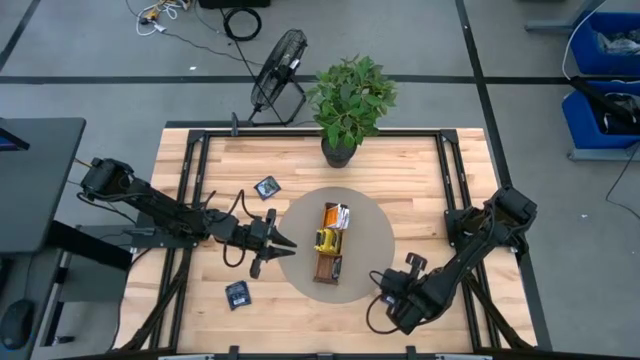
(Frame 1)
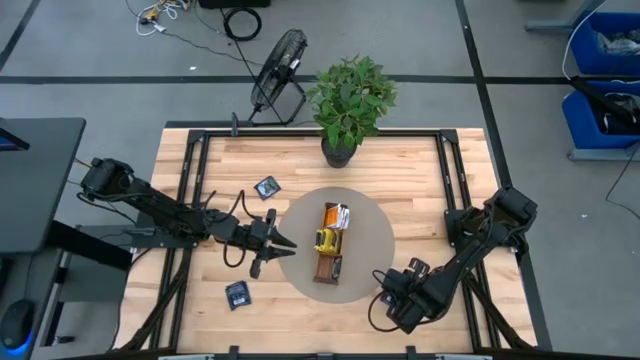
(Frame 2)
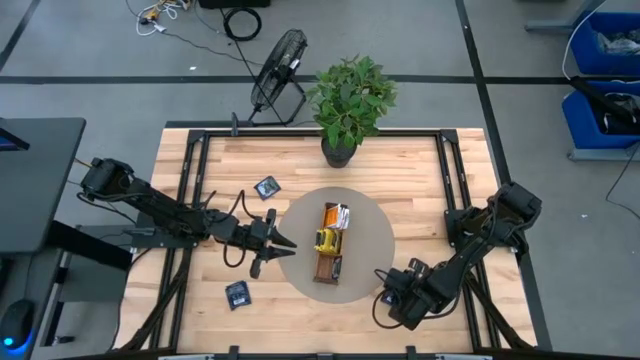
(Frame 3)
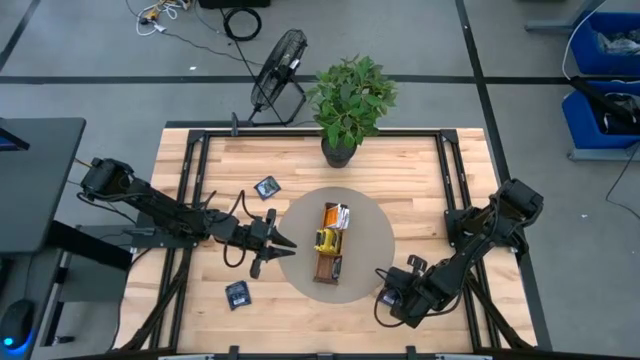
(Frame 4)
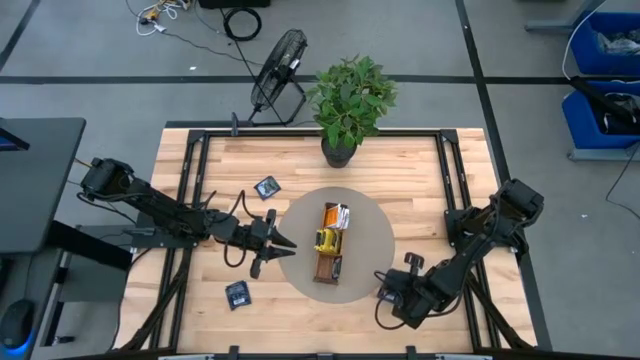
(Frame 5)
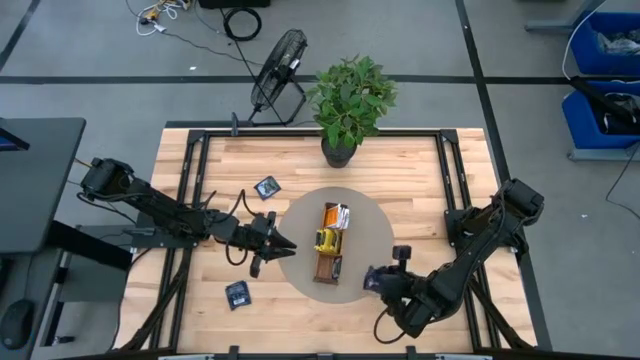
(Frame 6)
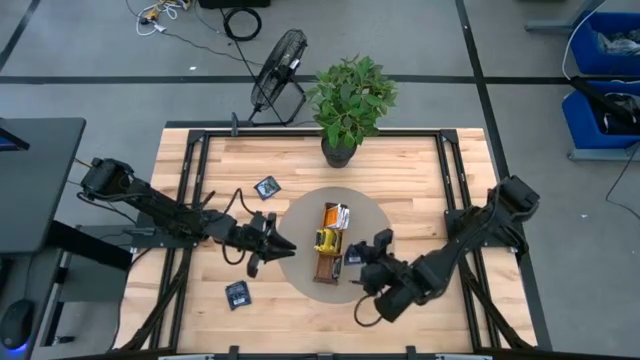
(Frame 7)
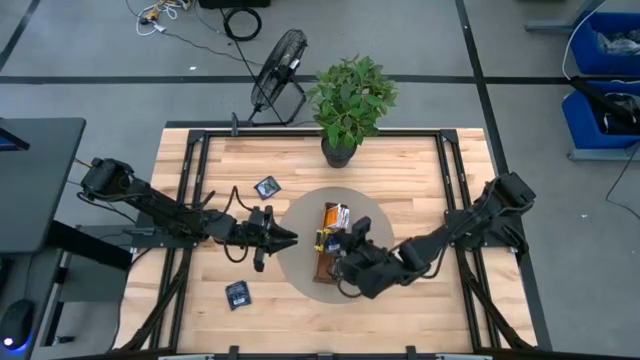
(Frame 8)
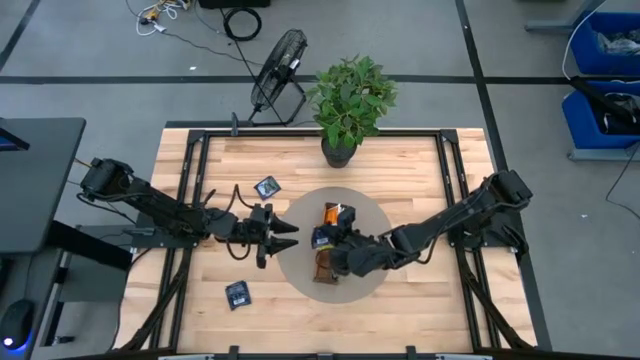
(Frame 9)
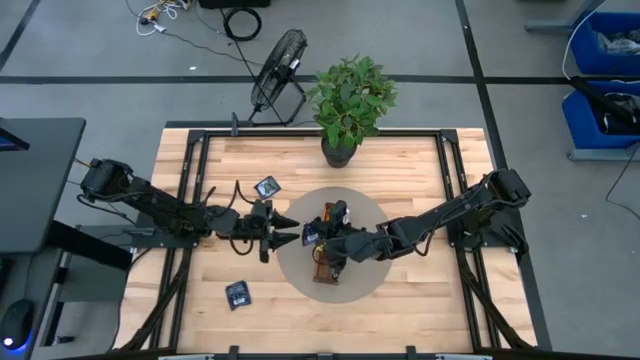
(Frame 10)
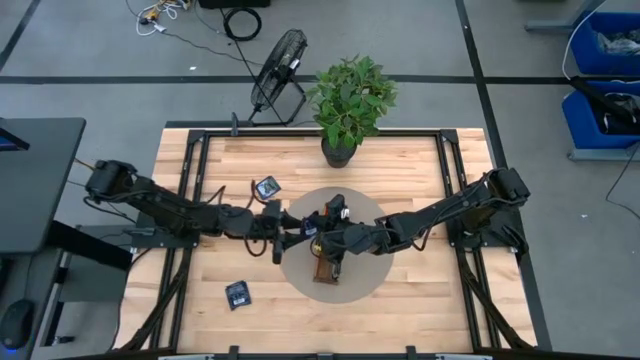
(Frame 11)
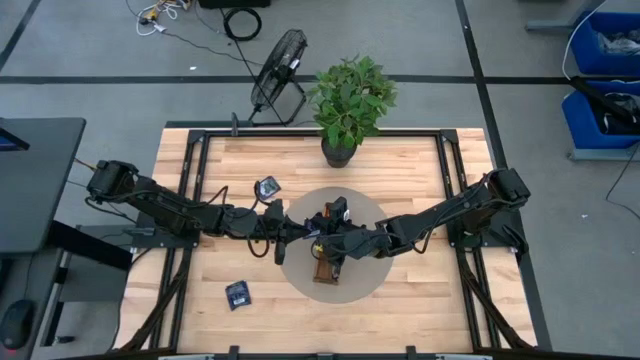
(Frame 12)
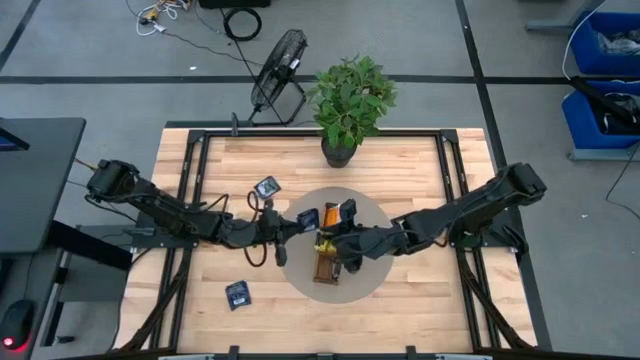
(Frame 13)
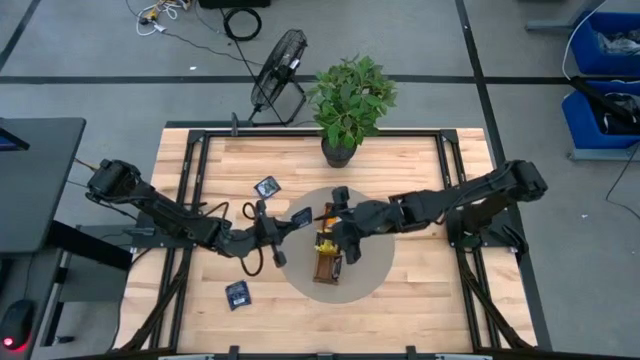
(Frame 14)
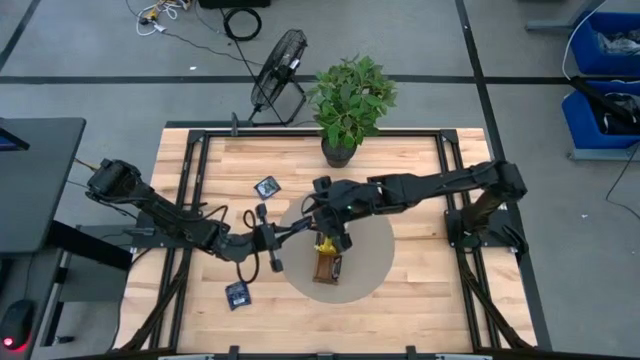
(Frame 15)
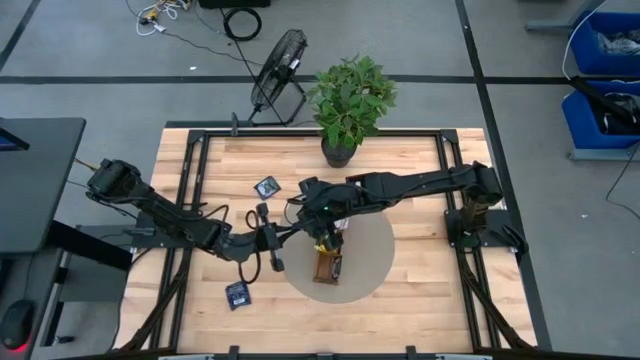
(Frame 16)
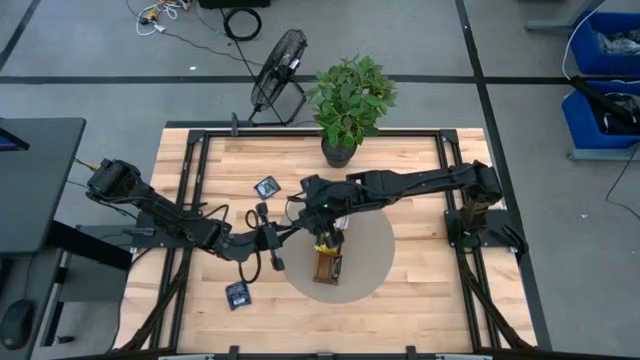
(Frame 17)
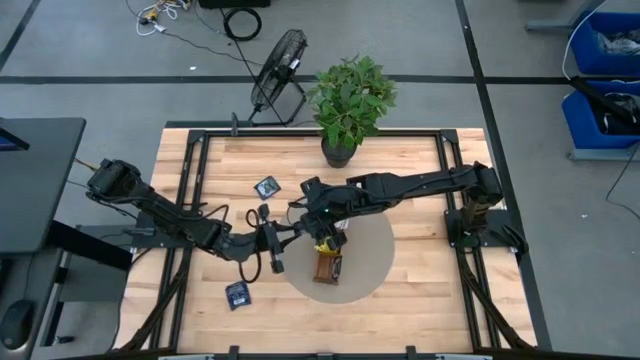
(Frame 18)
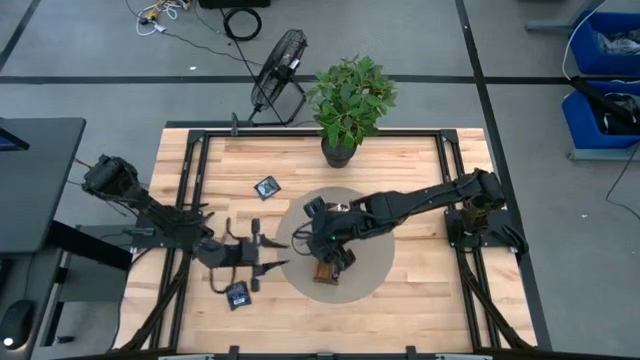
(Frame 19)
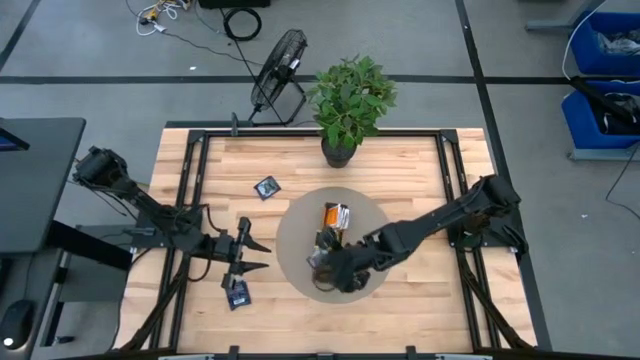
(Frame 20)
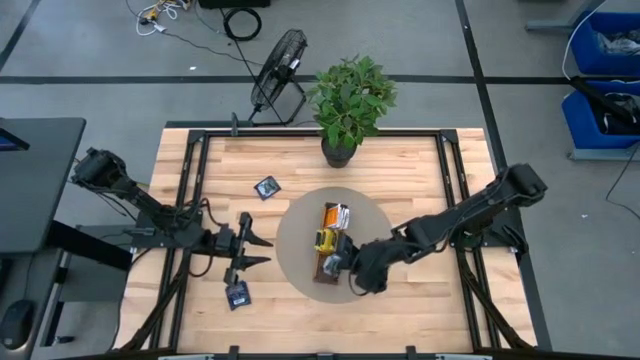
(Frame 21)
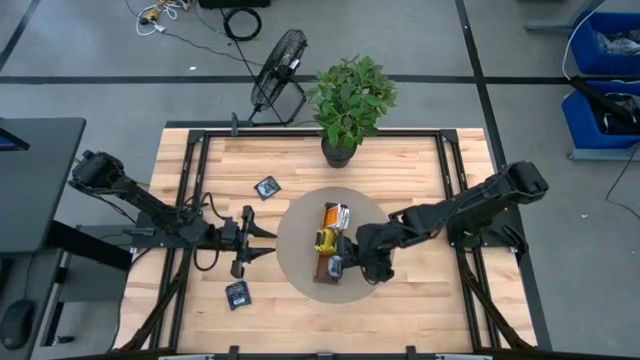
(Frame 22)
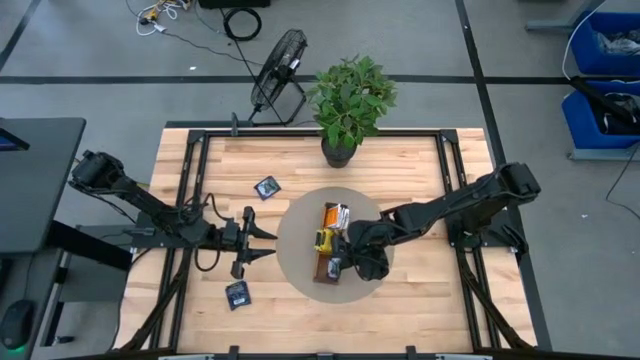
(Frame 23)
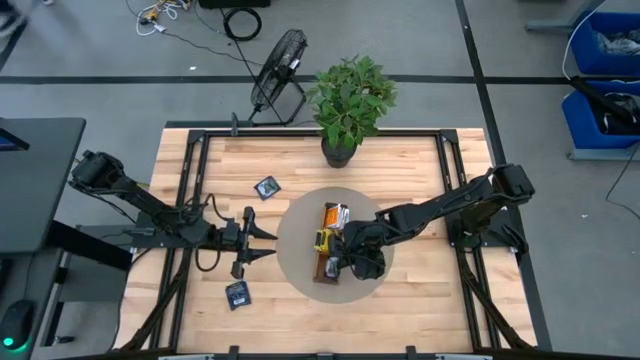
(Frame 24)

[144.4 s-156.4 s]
Task: Pick & Place Tea
Put the purple tea bag into the bottom compartment of the bottom section wooden organizer

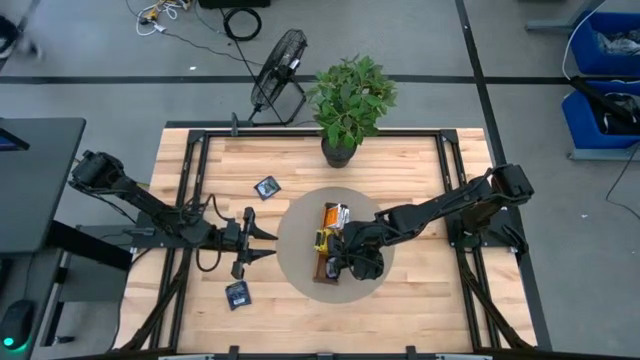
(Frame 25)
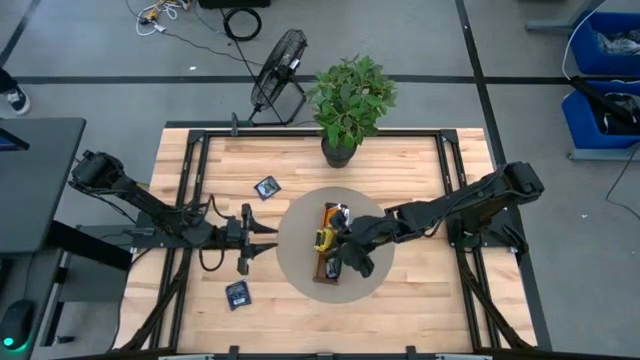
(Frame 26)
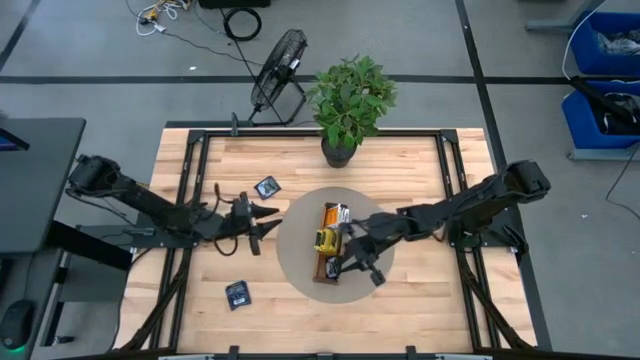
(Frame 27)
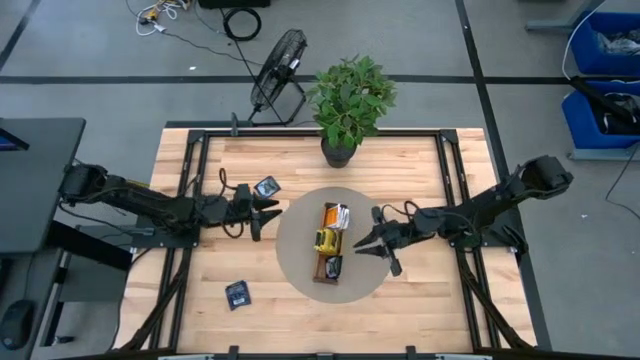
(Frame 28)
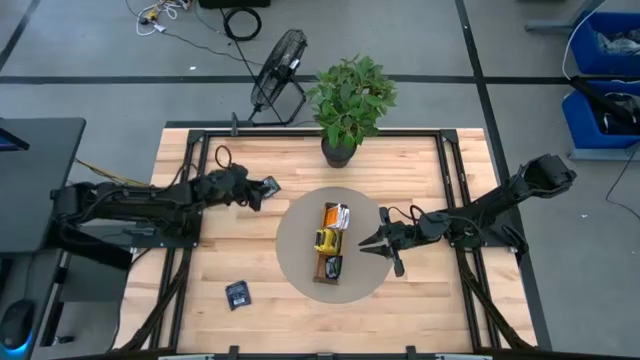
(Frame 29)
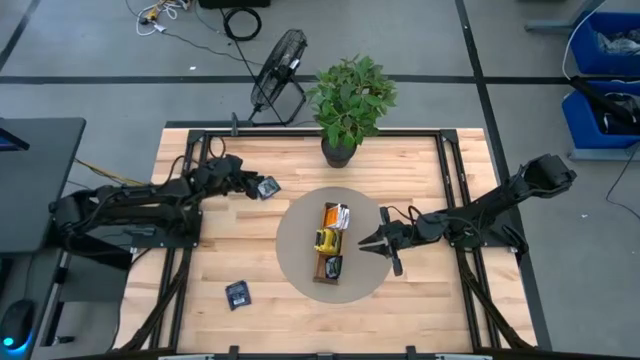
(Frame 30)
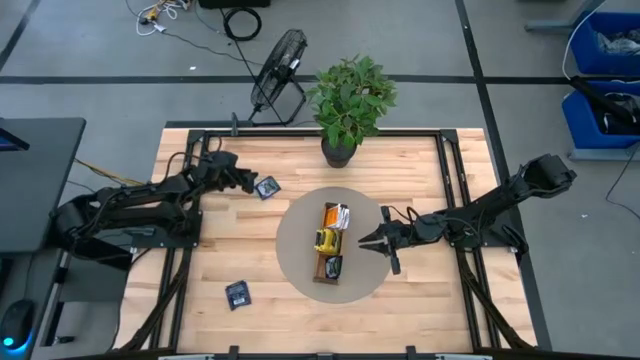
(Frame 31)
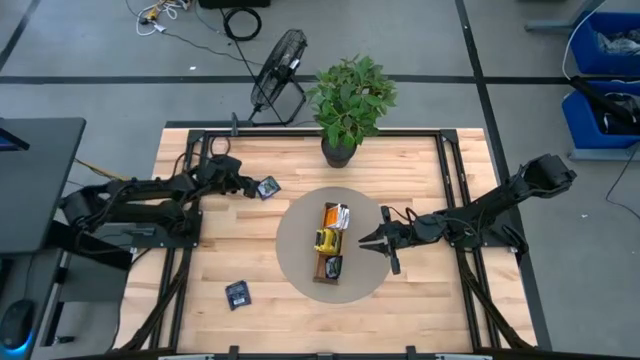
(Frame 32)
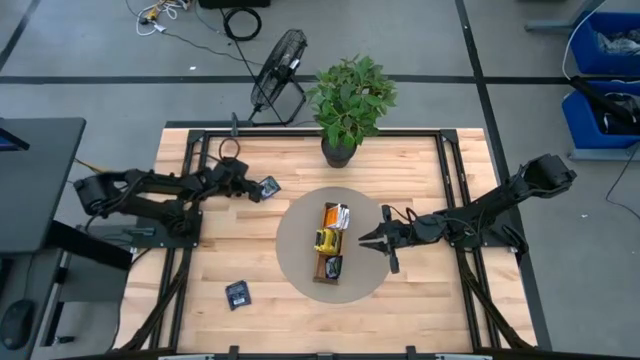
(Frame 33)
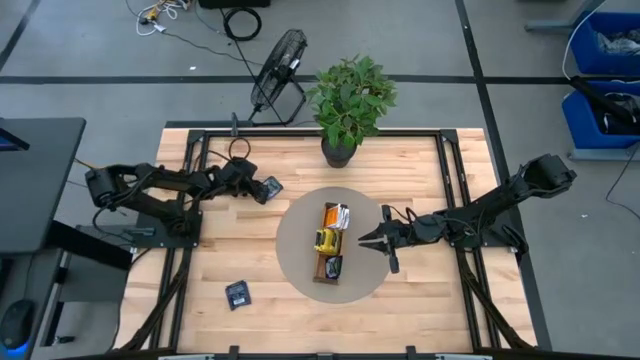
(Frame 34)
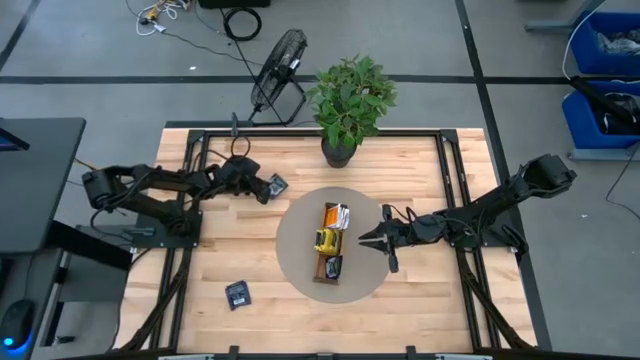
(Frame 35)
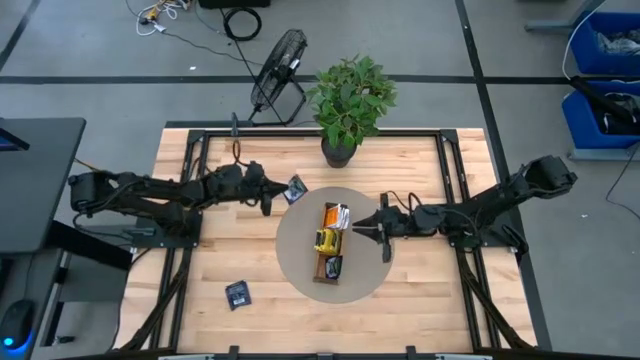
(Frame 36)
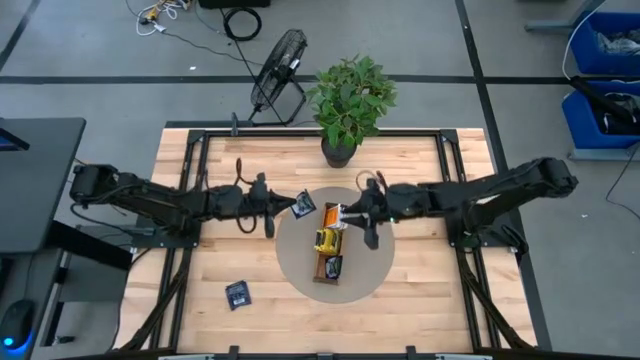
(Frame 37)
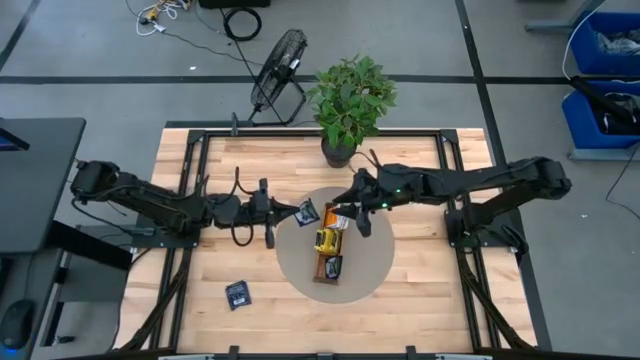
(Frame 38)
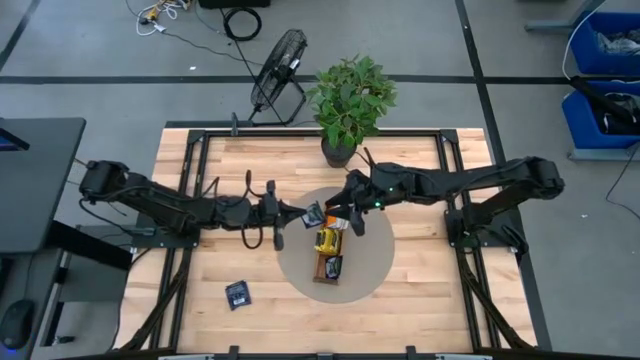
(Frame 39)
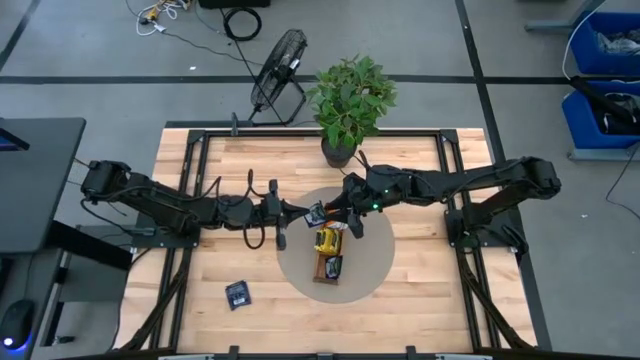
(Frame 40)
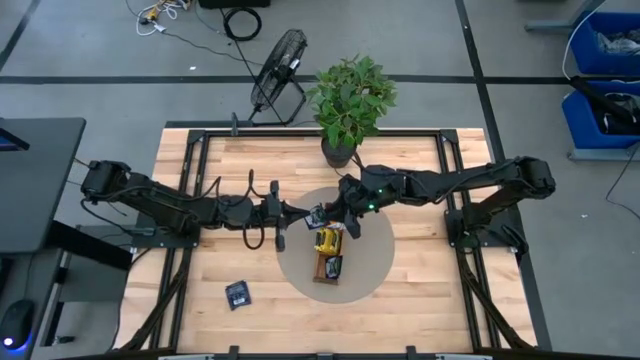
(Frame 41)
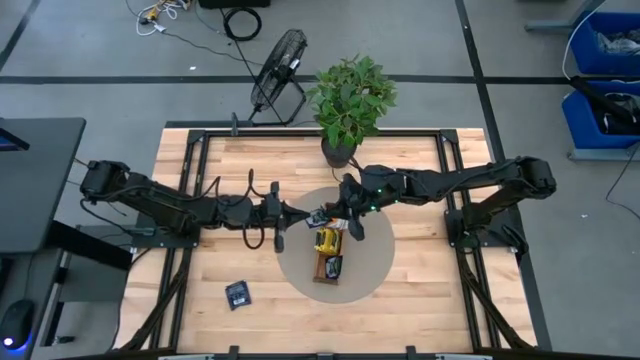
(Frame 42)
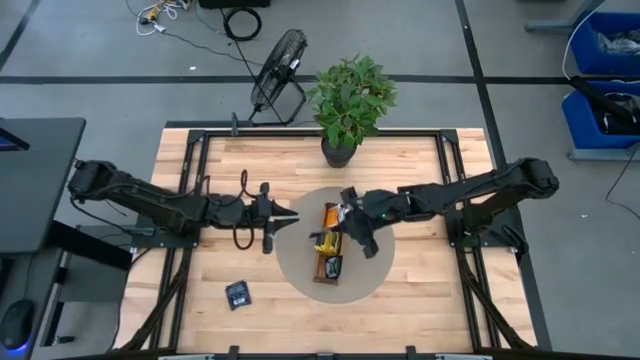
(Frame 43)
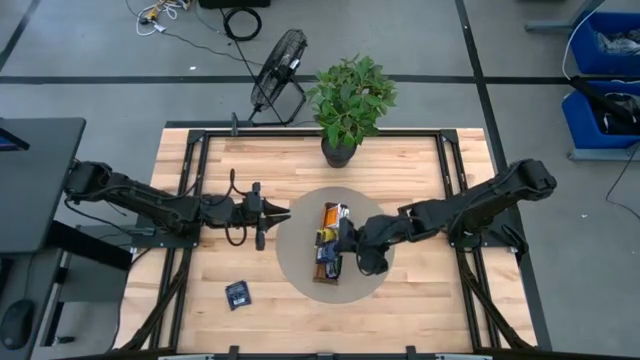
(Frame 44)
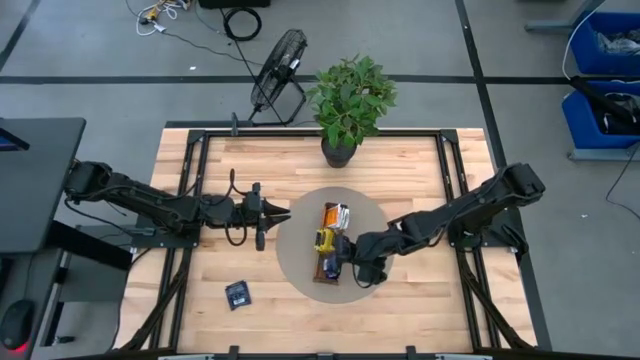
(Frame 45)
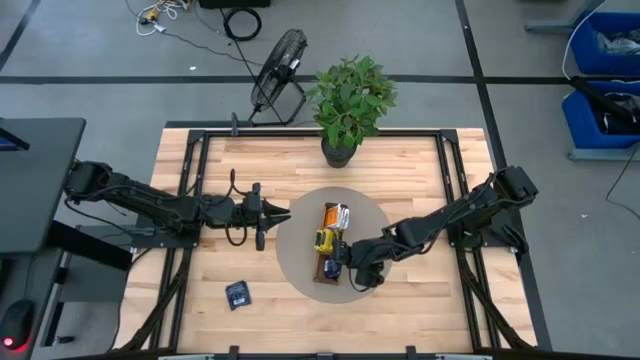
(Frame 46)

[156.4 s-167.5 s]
Put the purple tea bag into the bottom compartment of the bottom section wooden organizer
